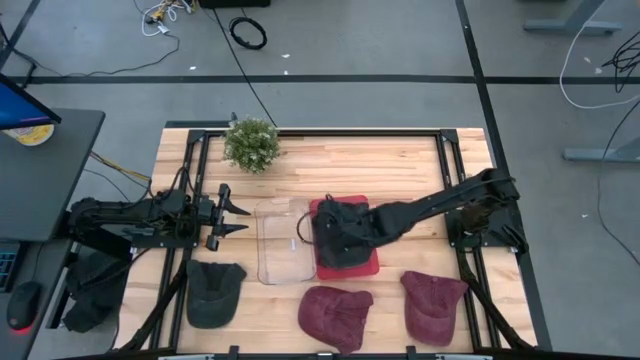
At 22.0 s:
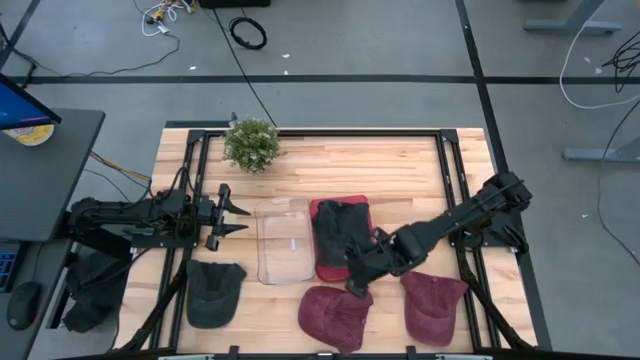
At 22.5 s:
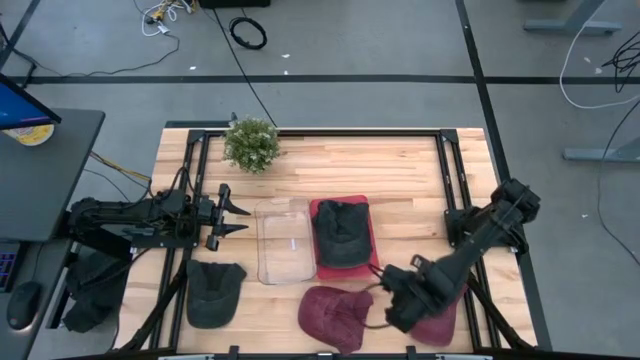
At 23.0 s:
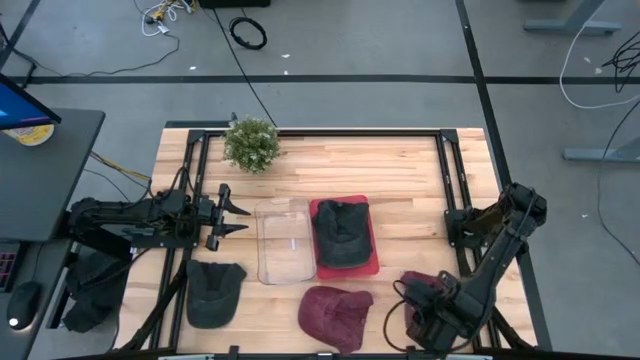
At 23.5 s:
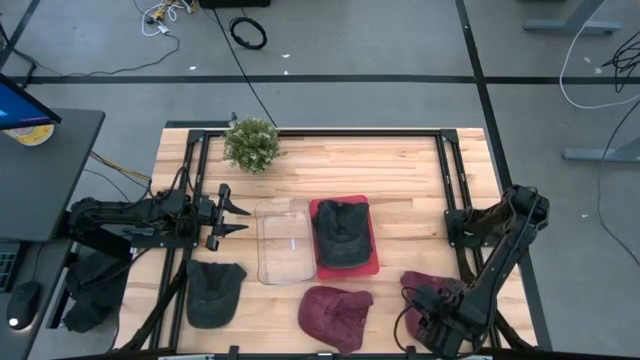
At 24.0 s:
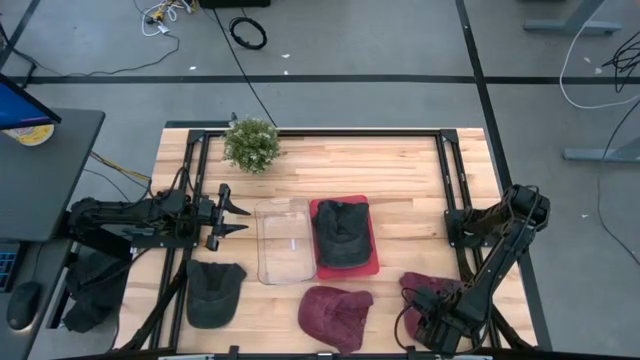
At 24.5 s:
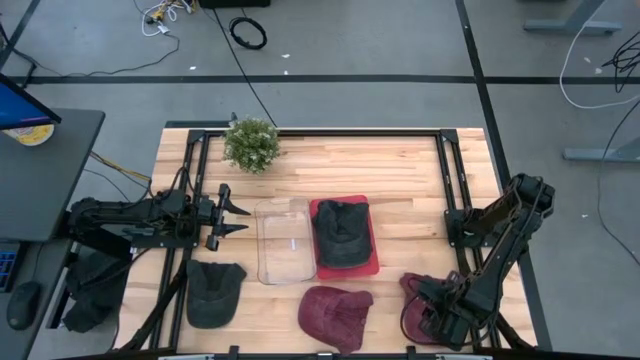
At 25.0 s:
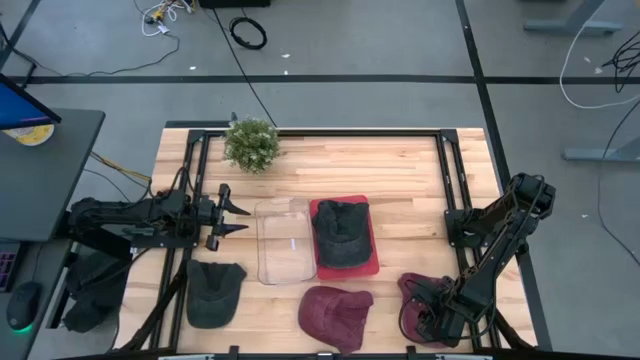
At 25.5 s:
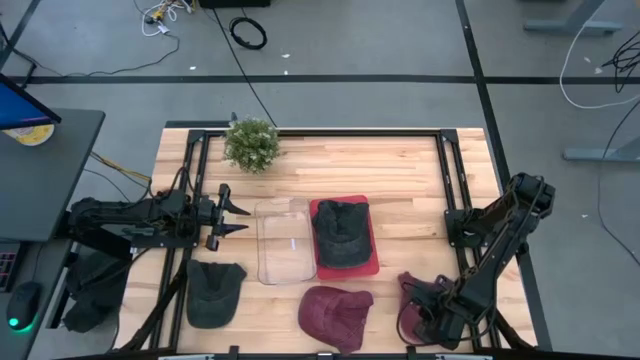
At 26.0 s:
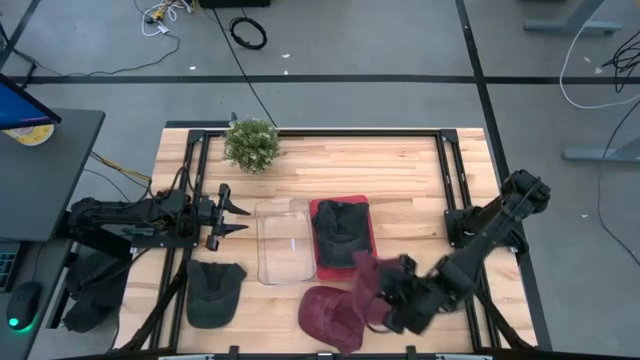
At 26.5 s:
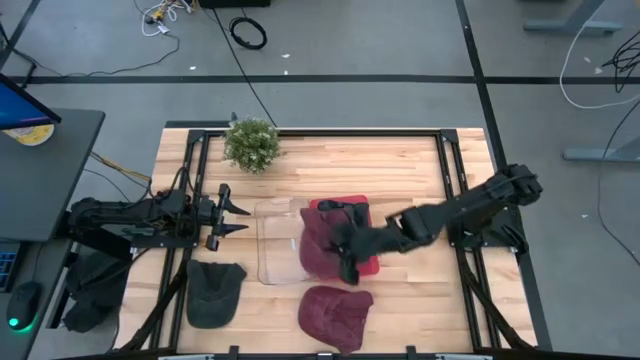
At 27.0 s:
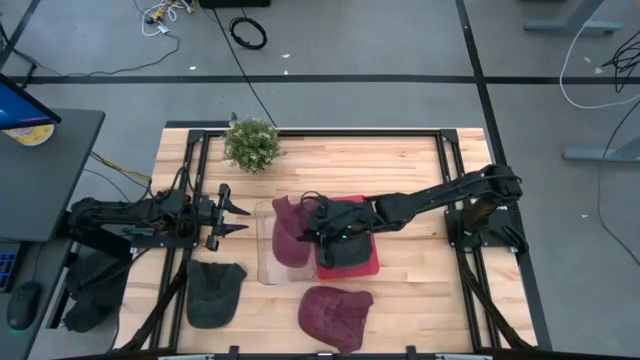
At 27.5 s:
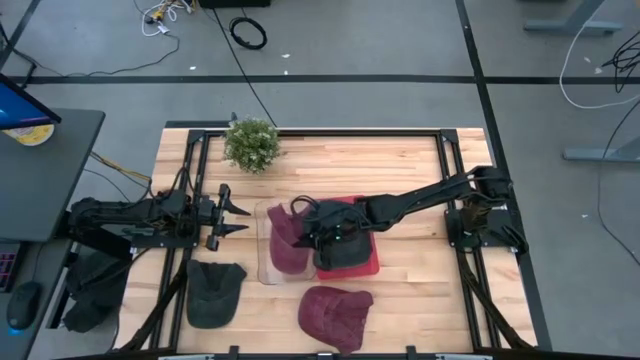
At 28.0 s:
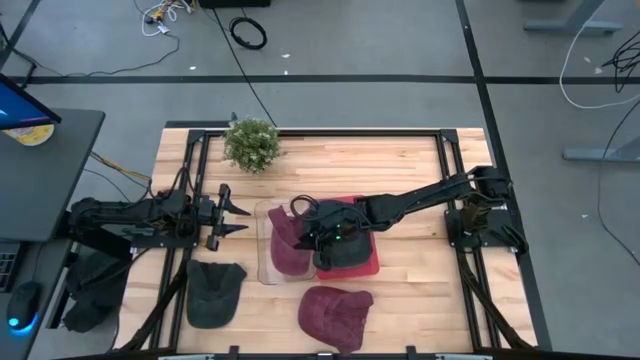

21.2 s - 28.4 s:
Task: Pick & Place hat
Put the right red cap into the transparent bin

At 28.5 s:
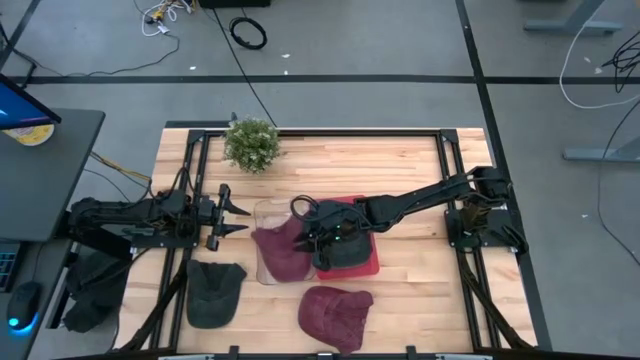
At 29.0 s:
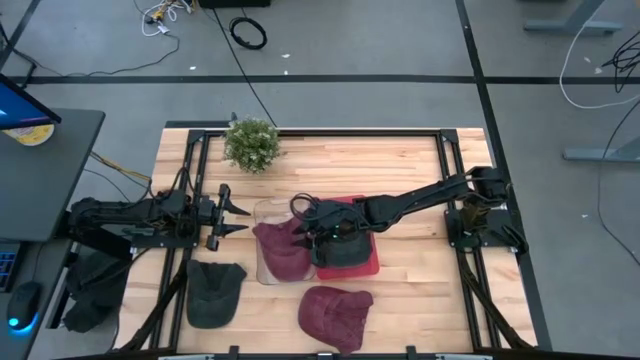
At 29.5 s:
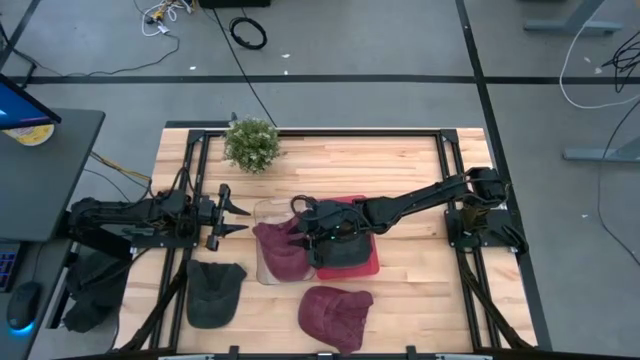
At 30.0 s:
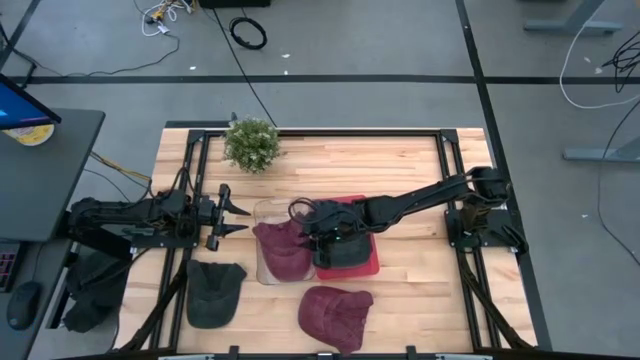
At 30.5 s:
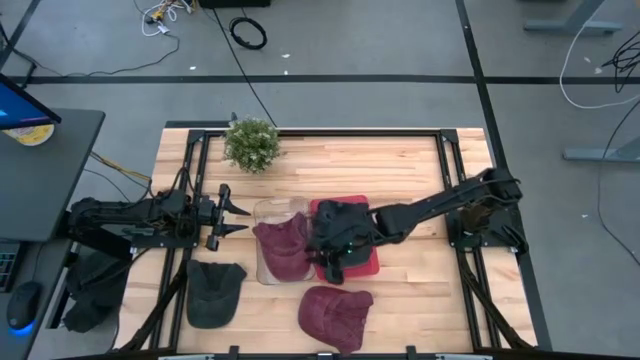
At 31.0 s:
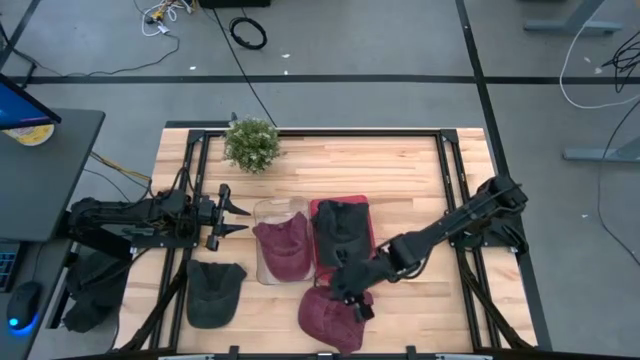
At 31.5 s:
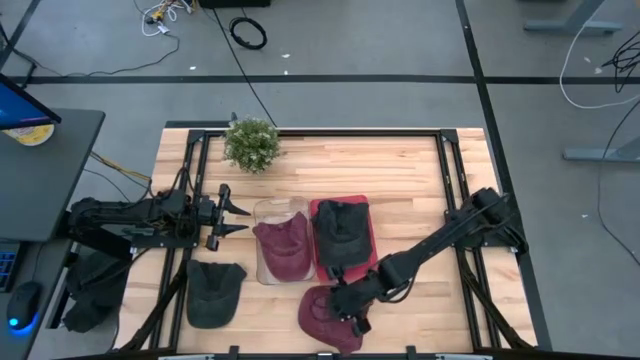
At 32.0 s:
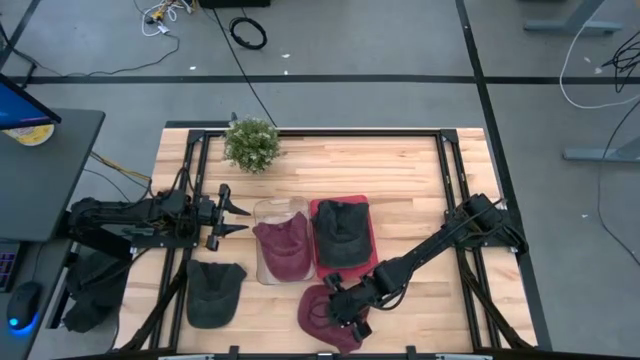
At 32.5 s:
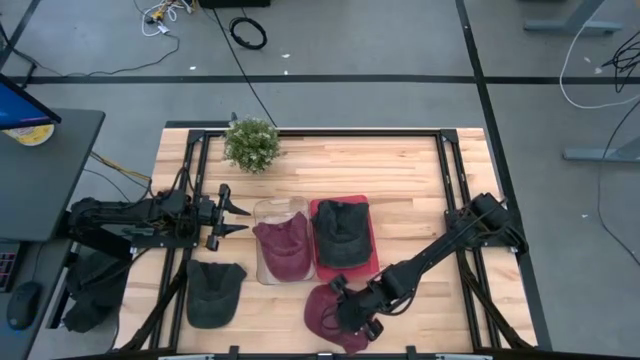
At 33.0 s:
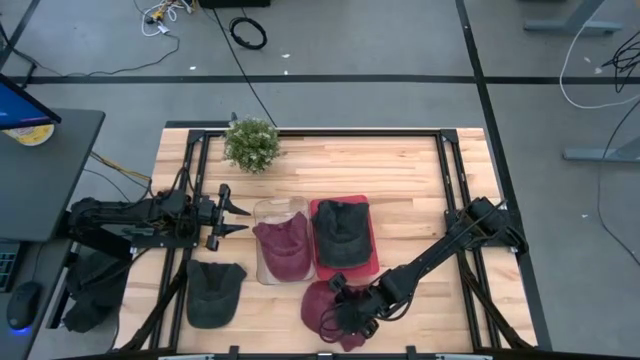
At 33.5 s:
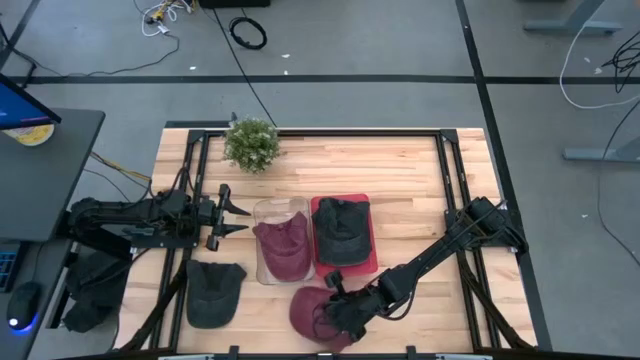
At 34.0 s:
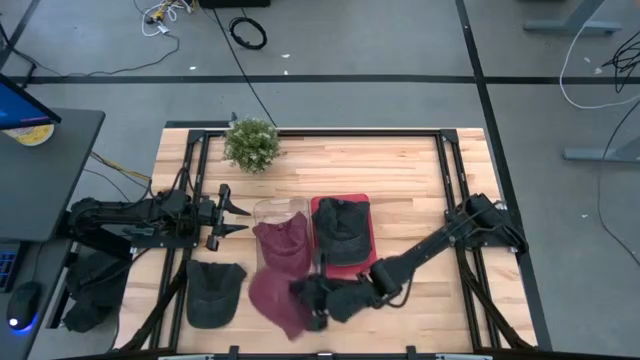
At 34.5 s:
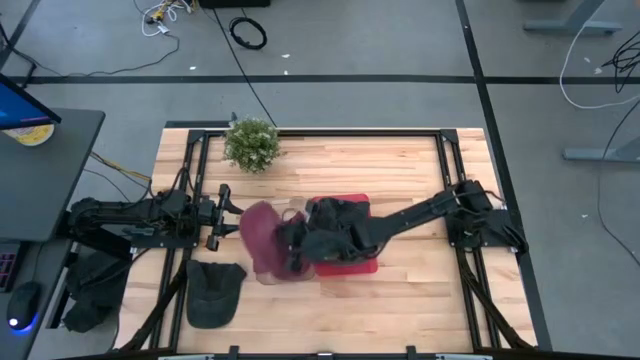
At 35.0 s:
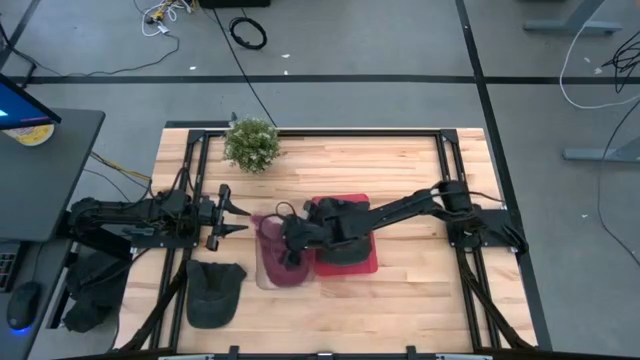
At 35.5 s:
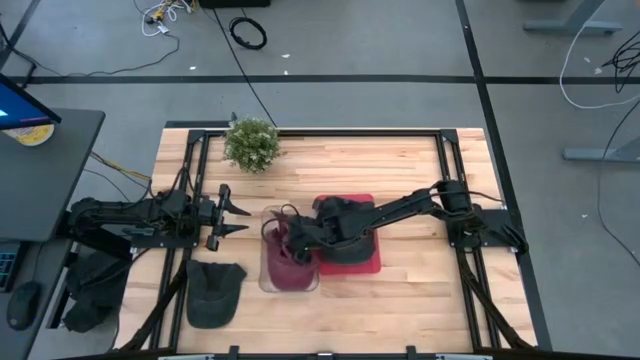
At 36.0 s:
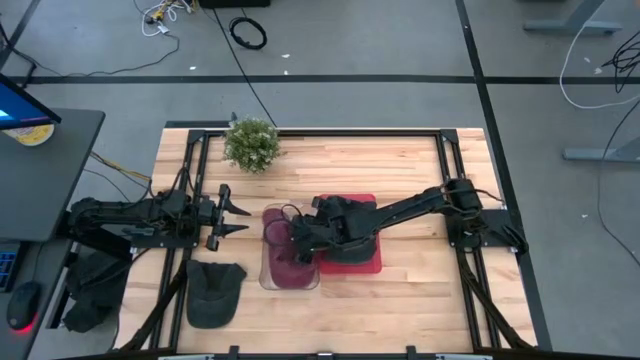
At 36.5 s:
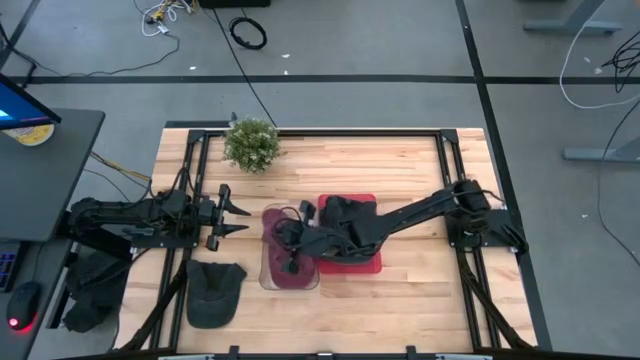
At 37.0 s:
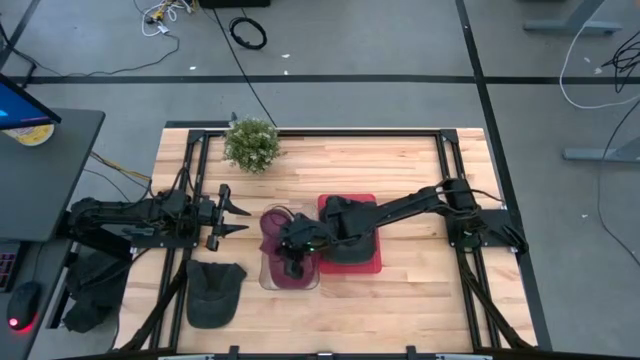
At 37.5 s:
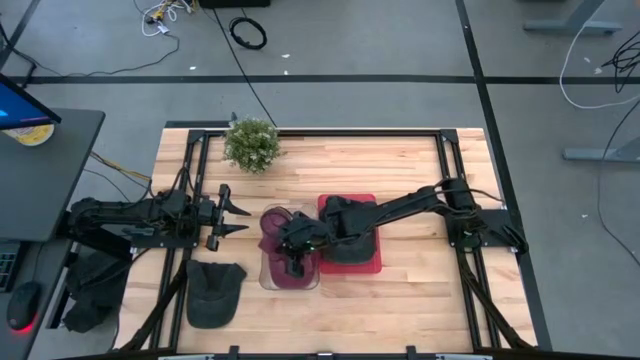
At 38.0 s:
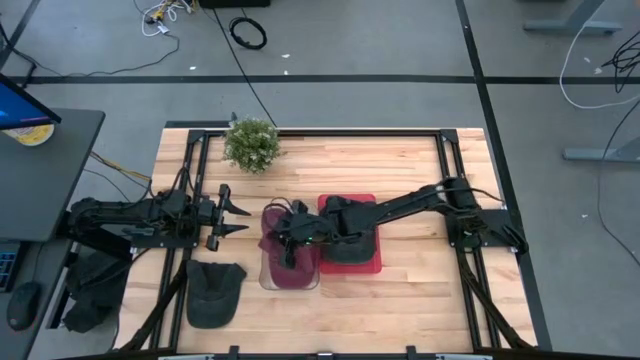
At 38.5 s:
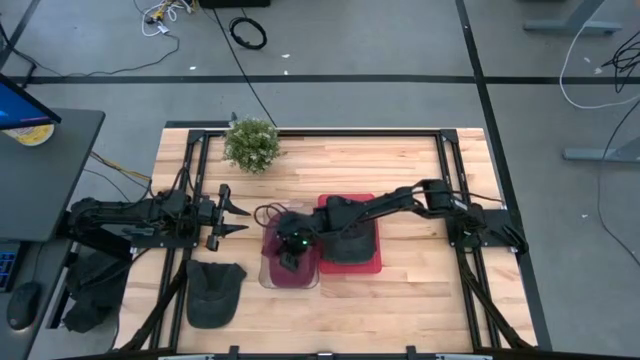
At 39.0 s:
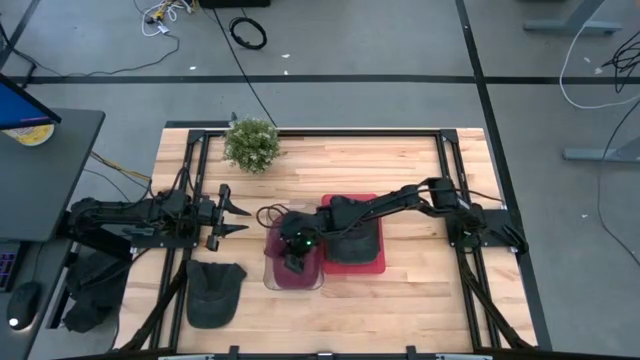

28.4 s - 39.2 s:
Put the red cap into the transparent bin

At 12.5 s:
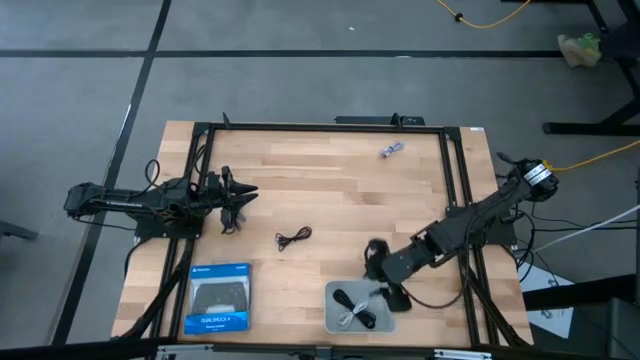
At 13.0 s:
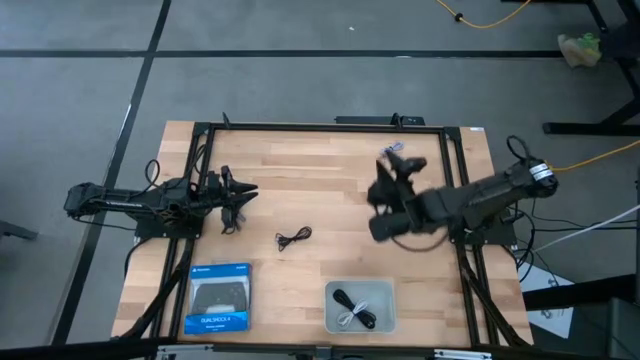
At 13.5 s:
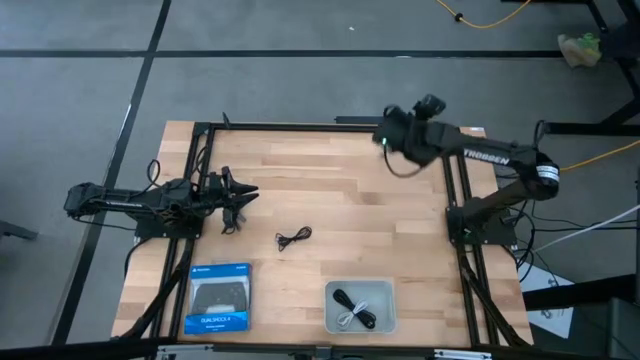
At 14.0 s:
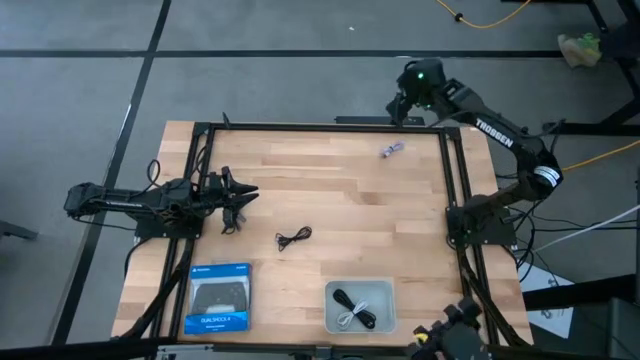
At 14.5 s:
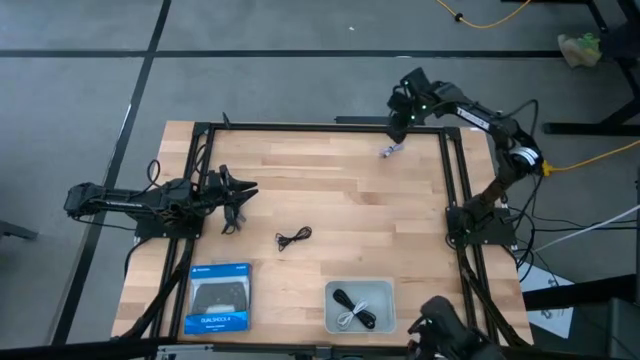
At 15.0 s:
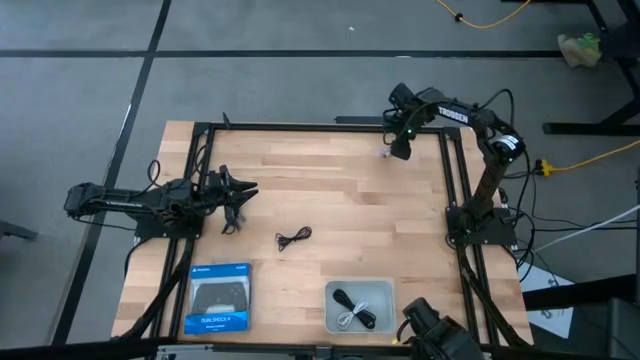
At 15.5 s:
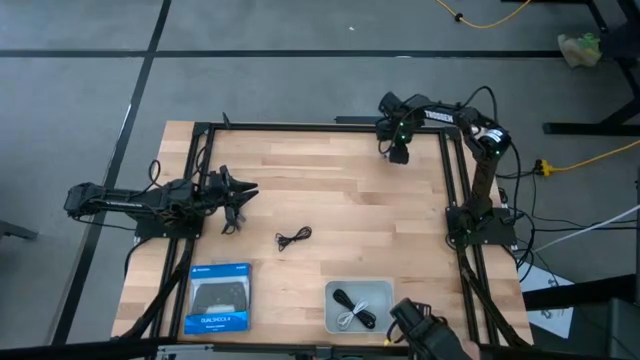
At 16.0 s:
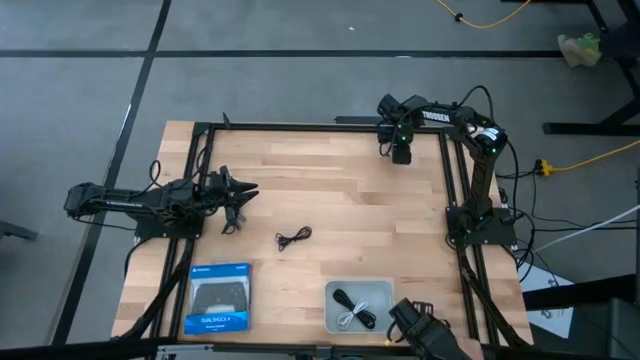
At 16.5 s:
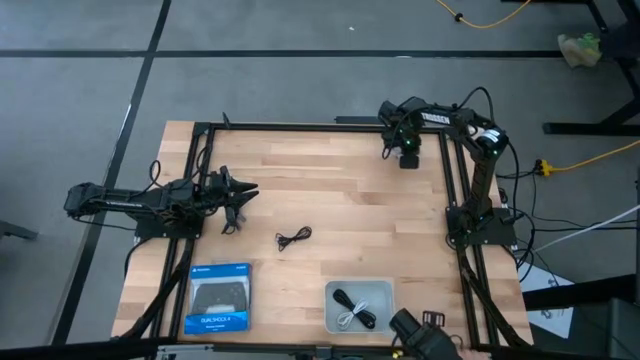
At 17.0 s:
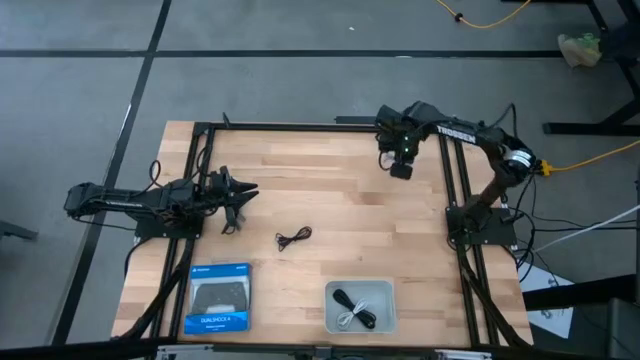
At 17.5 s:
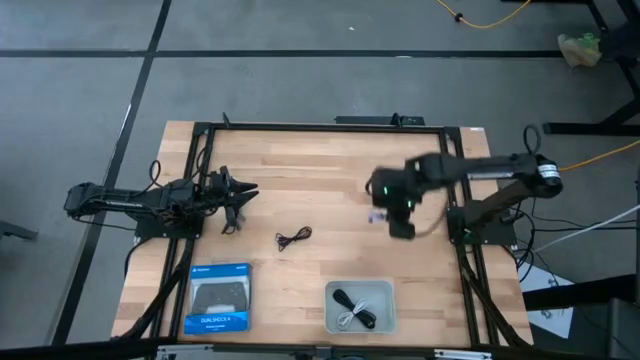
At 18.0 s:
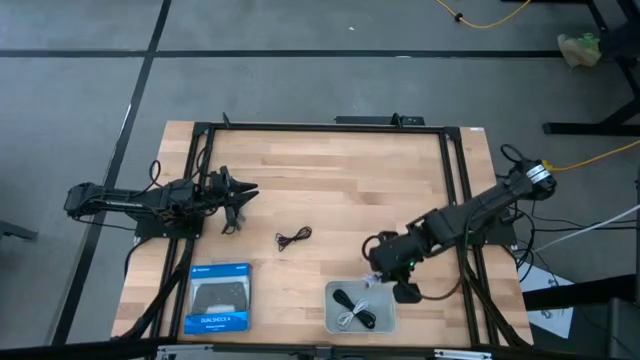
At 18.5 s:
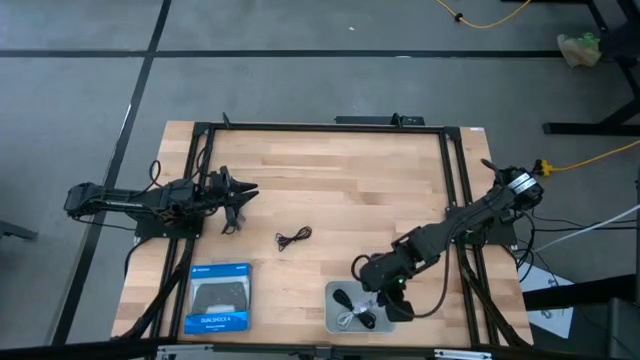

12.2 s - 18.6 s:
Task: Pick and place USB-C Cables
Put the purple USB cable into the white bin
